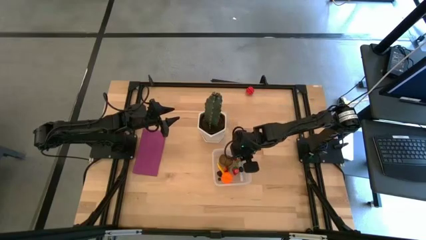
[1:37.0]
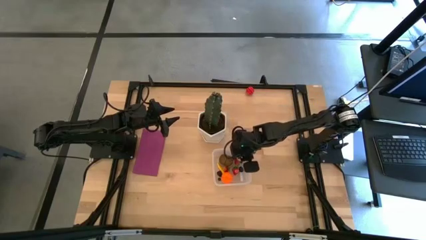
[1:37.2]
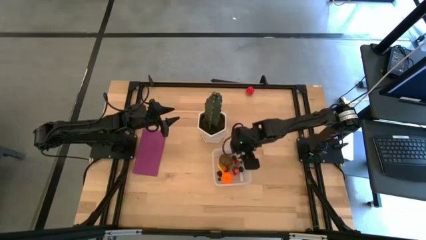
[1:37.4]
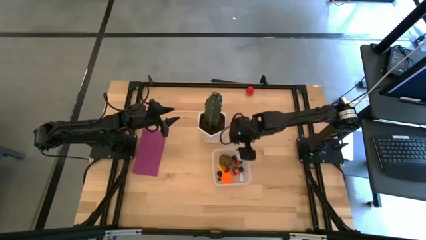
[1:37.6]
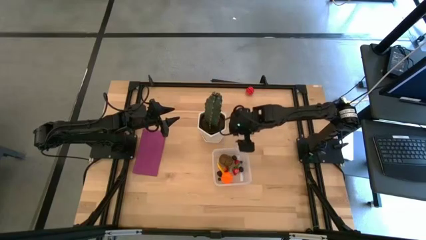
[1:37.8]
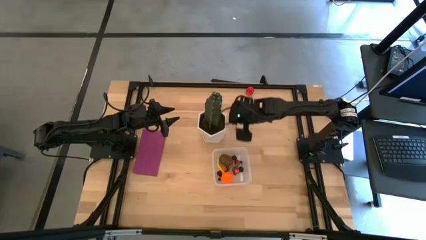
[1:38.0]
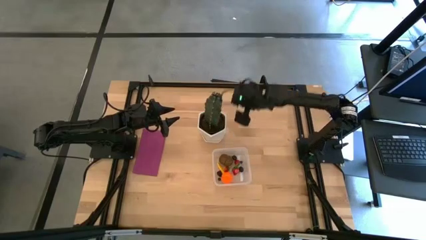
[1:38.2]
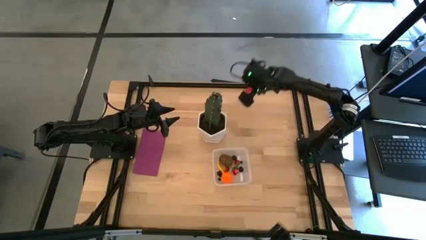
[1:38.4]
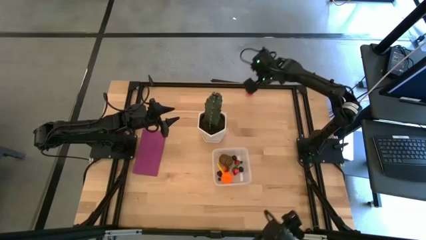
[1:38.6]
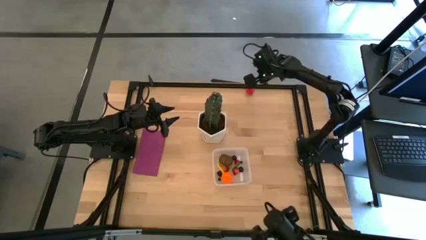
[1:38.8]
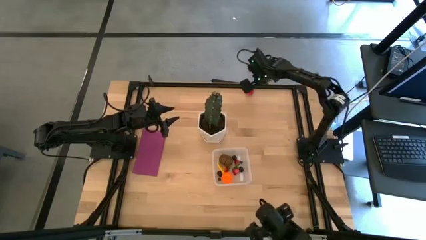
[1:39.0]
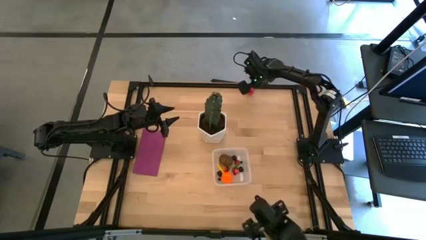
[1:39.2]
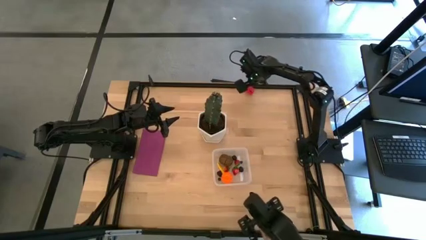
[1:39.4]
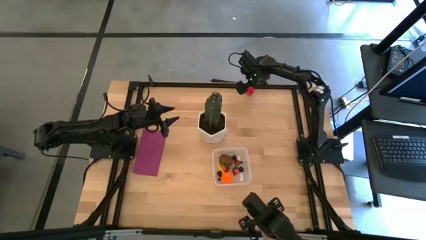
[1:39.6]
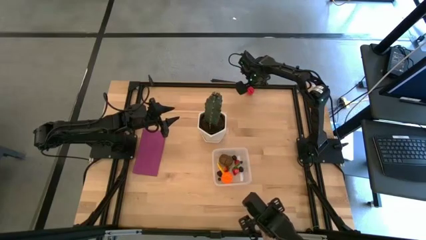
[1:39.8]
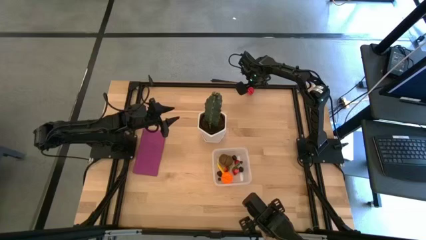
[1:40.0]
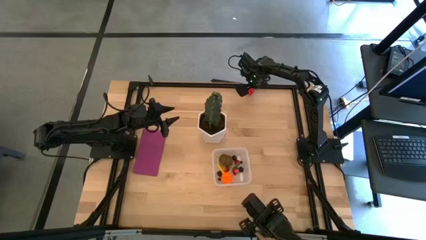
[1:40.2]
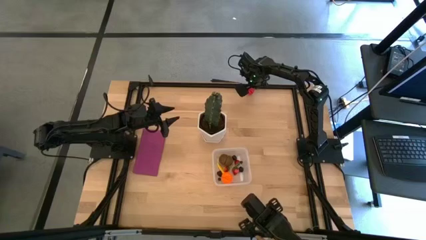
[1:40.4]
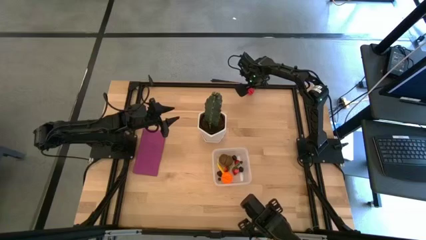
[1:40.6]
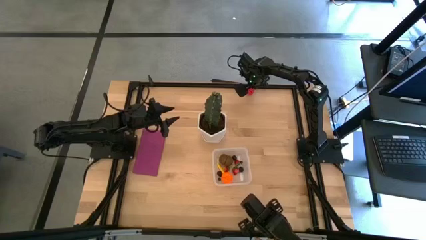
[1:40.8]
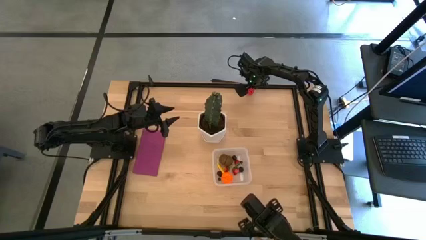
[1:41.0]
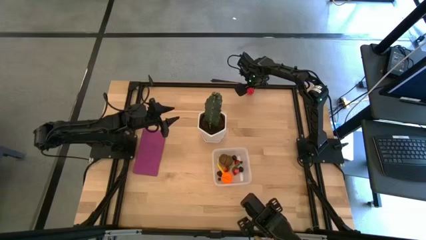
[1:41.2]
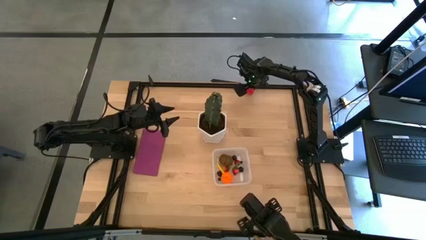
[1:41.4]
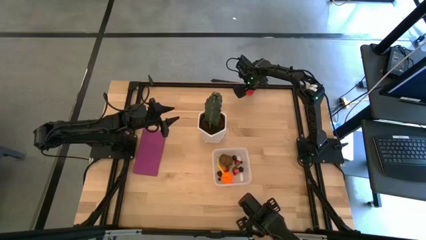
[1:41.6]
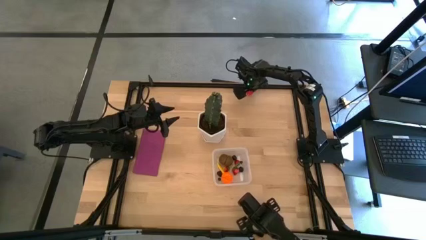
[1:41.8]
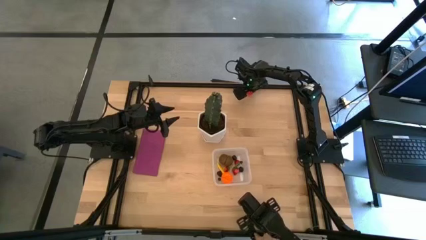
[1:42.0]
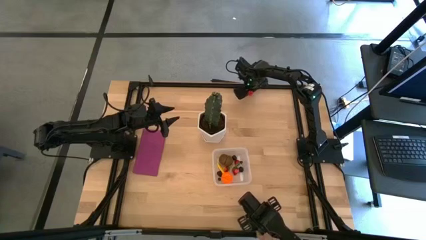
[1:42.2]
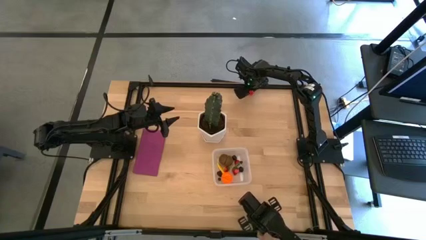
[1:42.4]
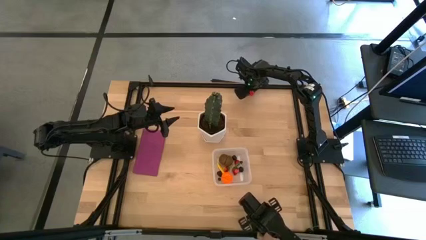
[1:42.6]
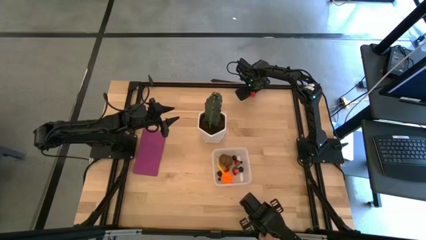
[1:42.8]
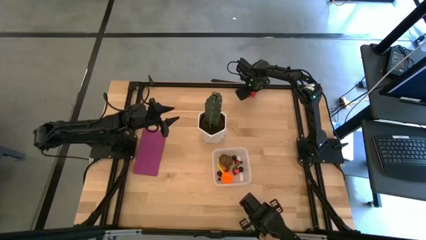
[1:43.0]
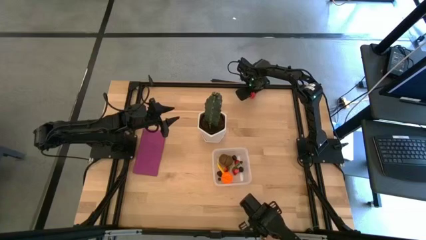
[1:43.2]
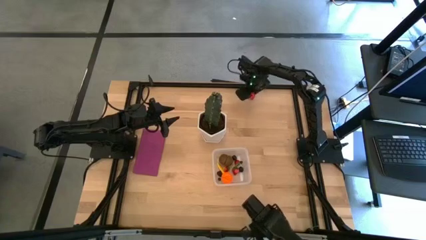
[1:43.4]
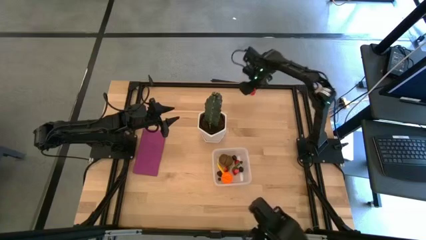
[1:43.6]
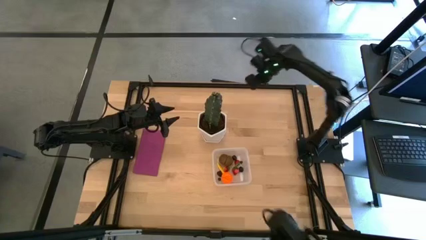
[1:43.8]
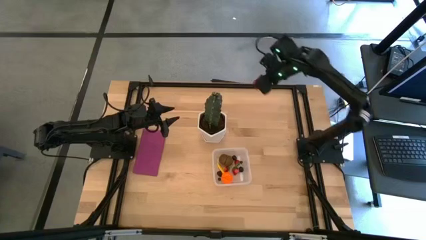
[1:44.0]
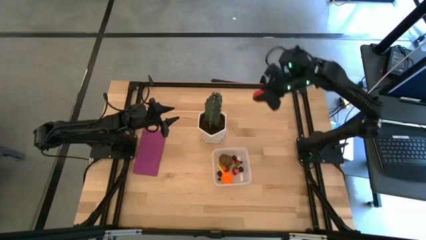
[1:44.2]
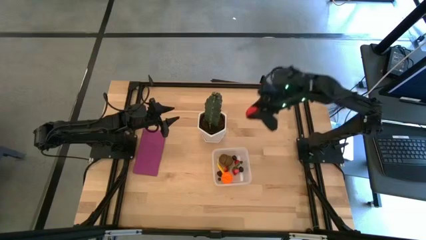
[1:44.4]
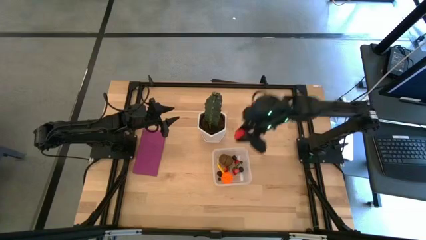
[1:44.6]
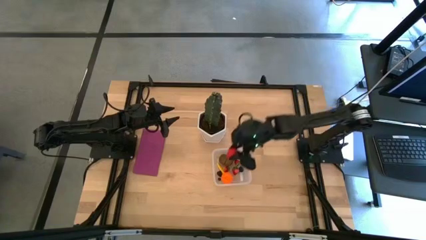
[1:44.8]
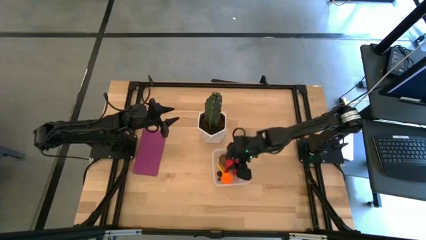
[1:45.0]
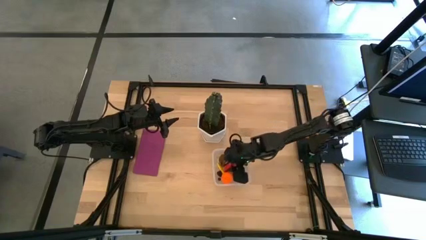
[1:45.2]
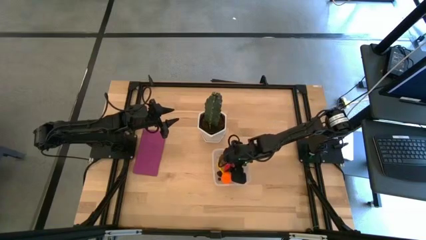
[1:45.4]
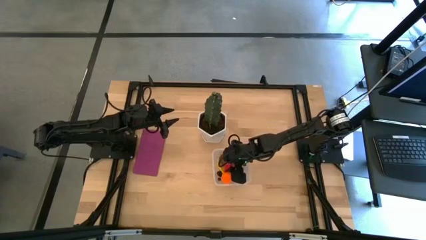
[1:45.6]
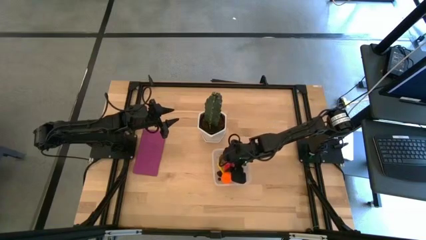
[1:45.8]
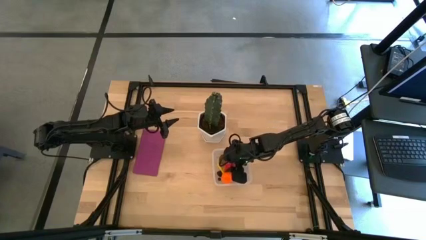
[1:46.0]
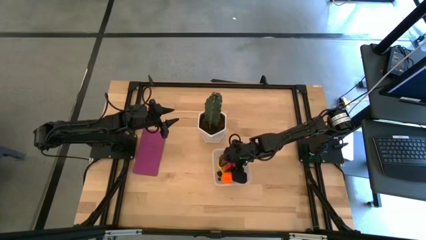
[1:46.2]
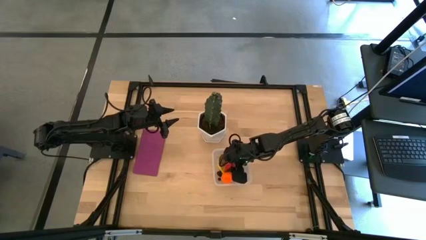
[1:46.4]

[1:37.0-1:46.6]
Task: Pick and placing Produce into tupperware
Put the strawberry into the transparent bin

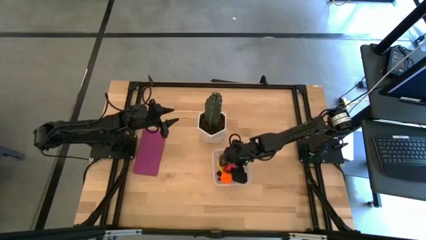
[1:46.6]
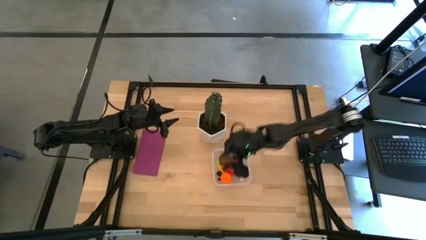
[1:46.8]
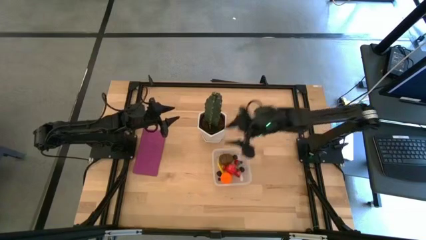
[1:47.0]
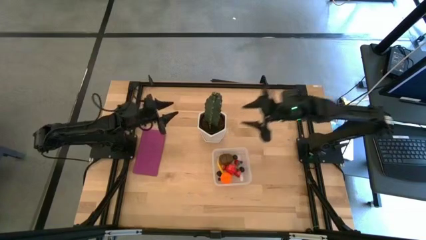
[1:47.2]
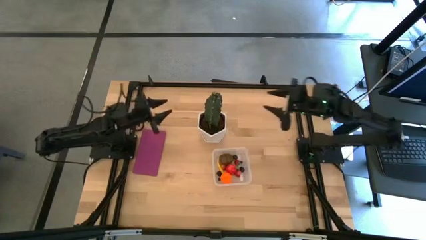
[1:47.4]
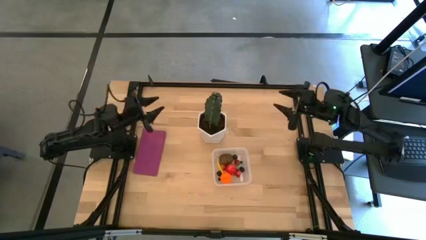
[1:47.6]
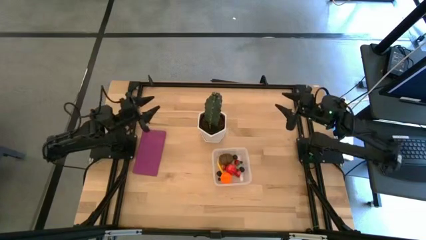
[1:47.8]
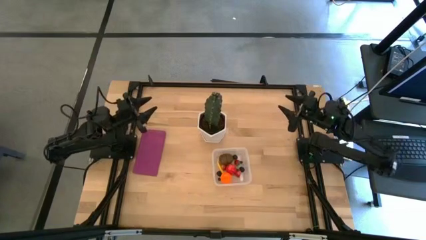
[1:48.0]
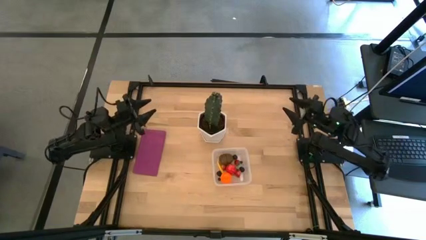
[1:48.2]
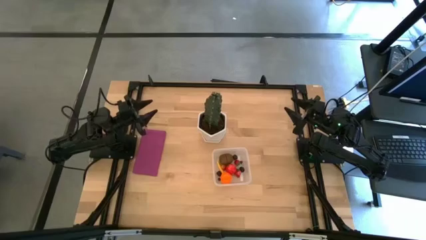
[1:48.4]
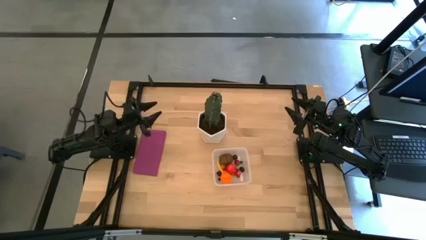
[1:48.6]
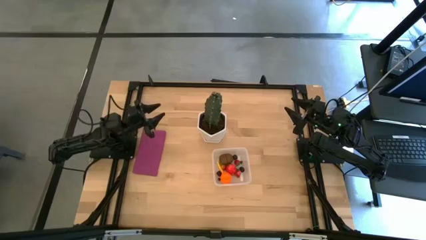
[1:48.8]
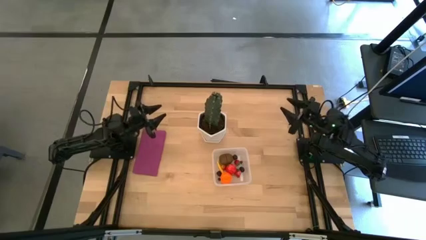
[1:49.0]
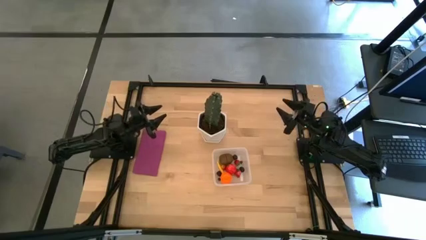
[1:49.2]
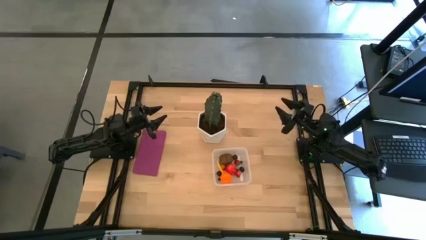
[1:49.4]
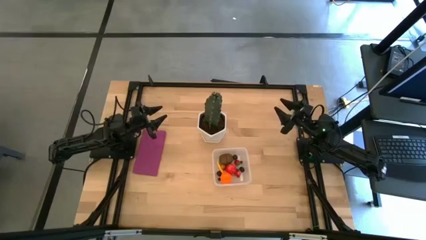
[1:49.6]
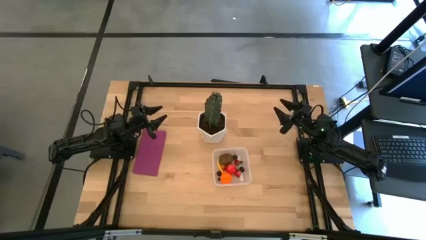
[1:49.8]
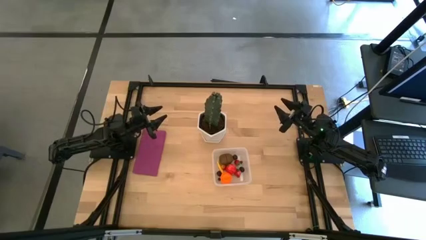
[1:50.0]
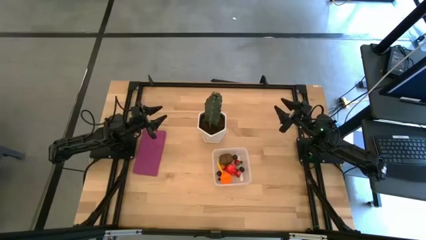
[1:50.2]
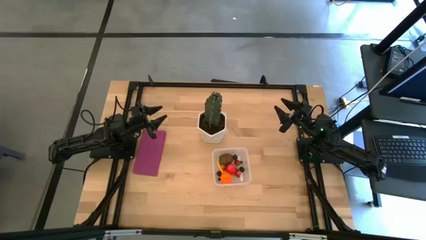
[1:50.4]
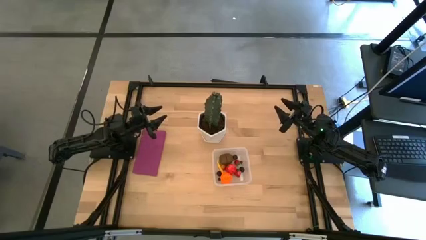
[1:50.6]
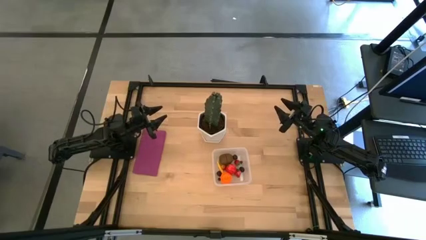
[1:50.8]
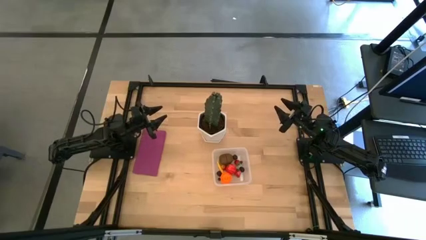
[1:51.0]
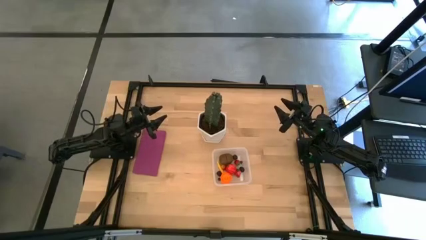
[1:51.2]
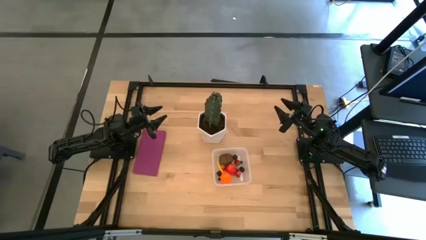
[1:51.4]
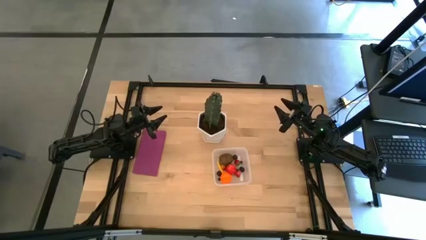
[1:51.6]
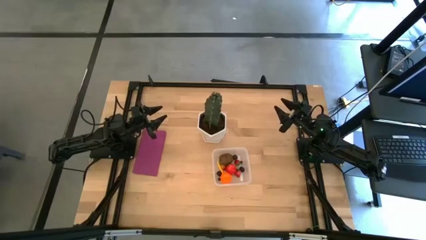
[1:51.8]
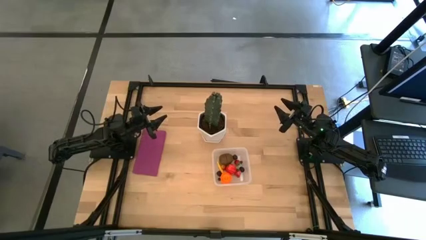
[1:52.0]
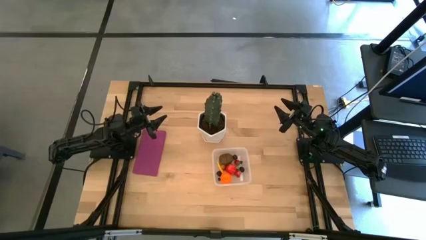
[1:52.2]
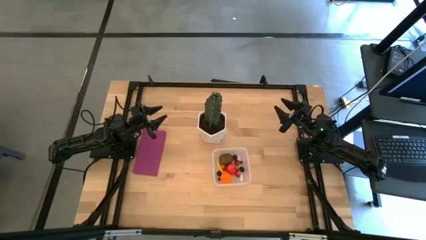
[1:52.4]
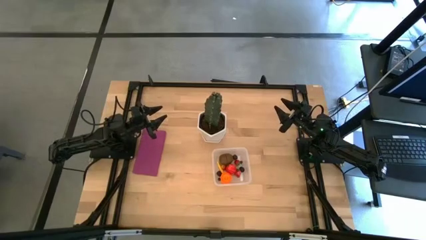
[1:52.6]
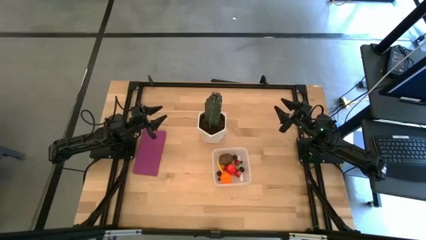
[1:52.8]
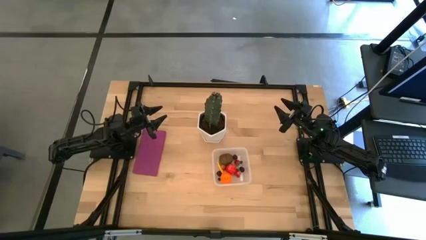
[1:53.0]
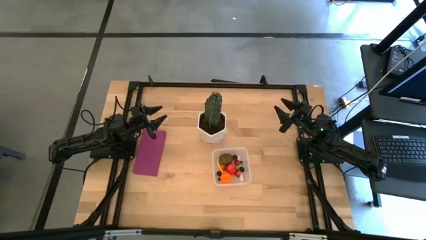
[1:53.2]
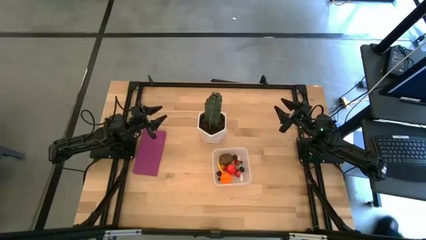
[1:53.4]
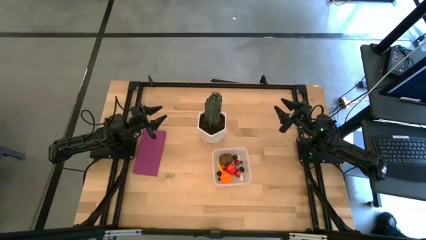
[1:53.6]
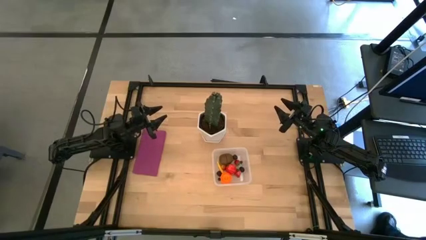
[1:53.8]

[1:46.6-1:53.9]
Return to Home Position
